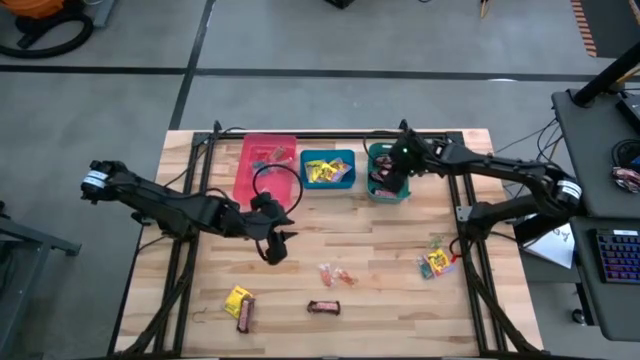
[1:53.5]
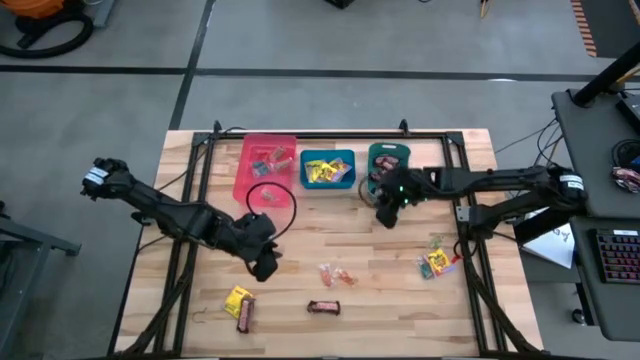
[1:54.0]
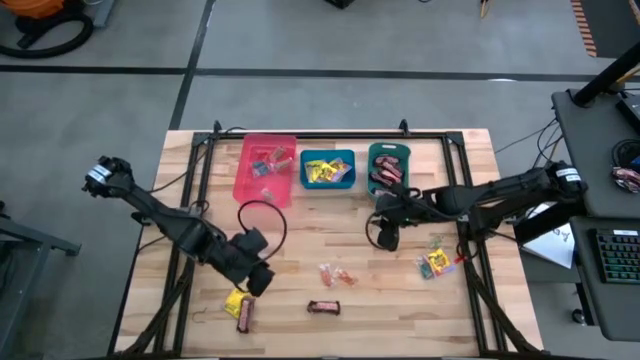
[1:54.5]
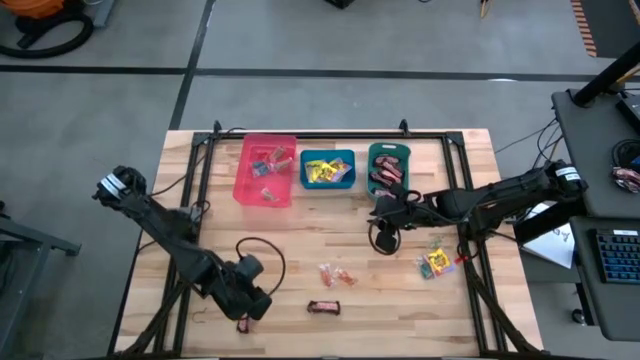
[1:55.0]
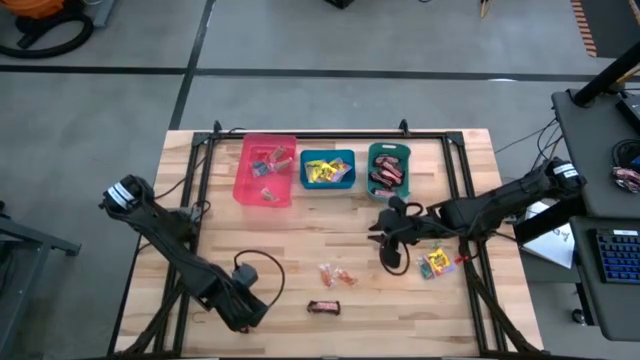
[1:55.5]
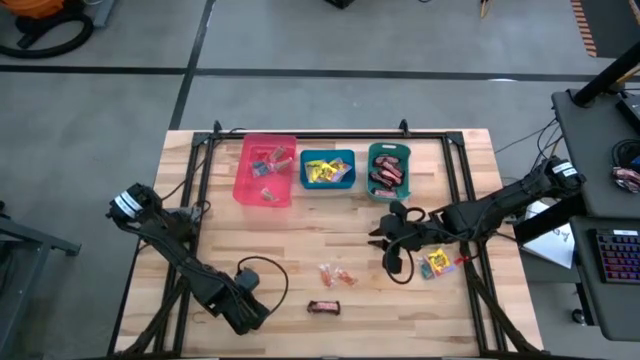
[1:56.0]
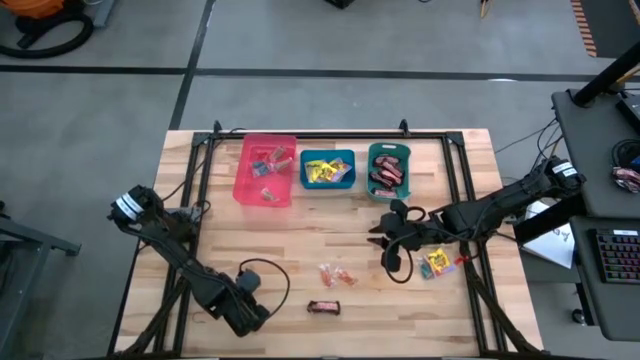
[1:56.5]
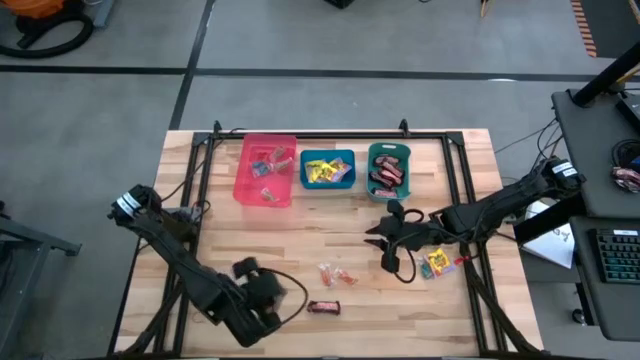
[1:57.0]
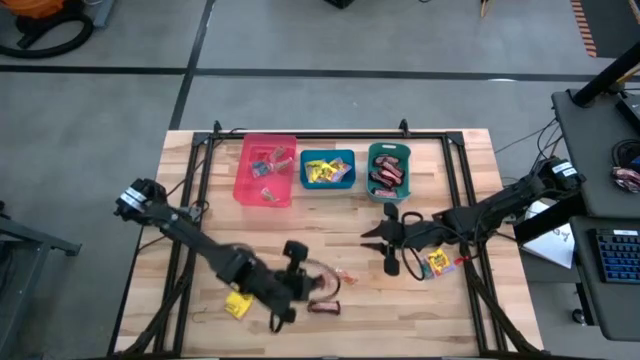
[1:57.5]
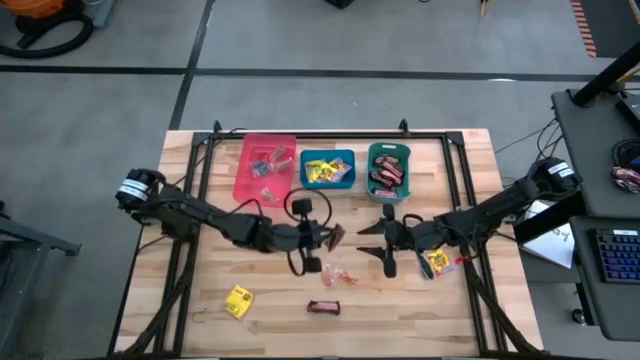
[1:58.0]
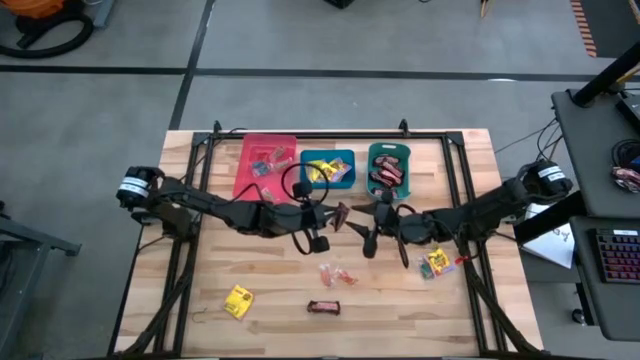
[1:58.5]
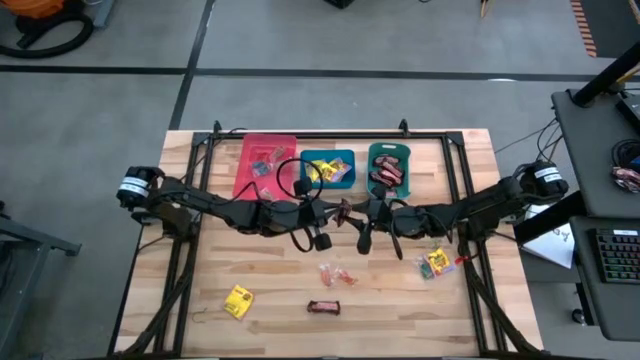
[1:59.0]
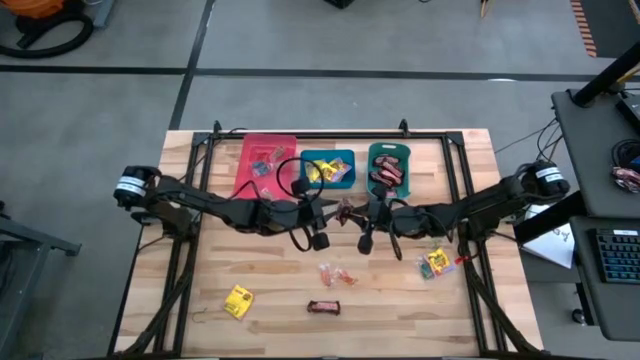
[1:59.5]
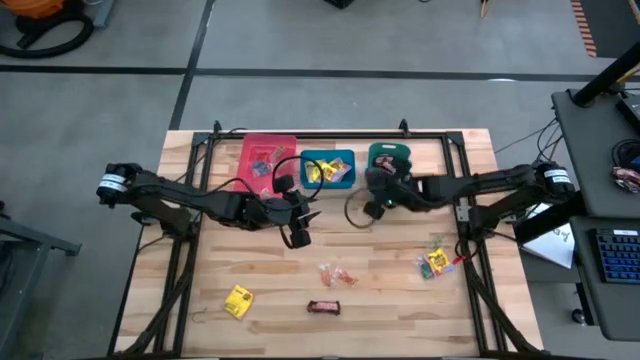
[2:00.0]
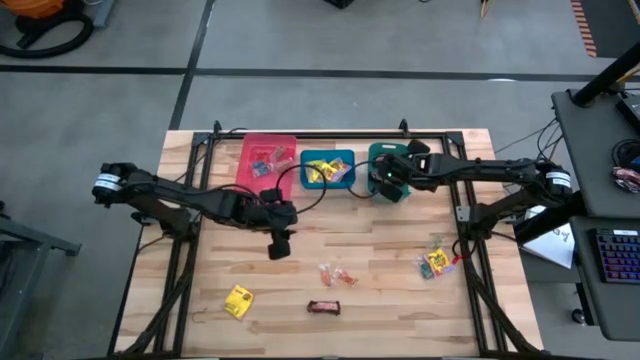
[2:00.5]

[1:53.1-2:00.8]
Task: Sort candy
Put the left brown candy into the green bin

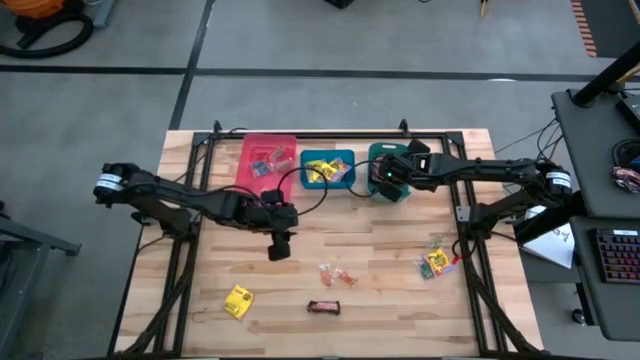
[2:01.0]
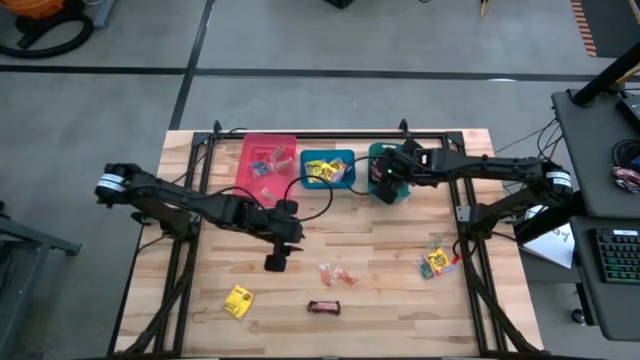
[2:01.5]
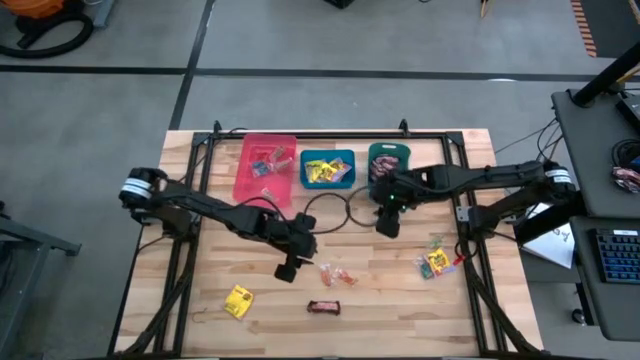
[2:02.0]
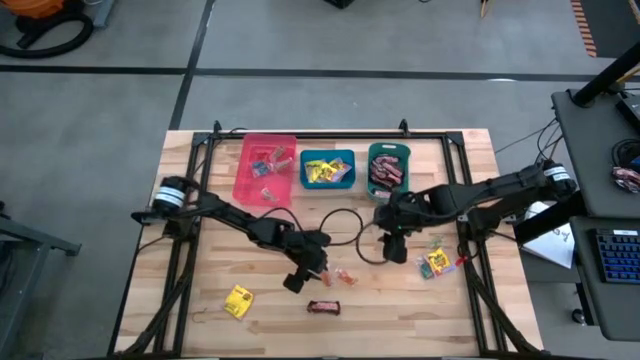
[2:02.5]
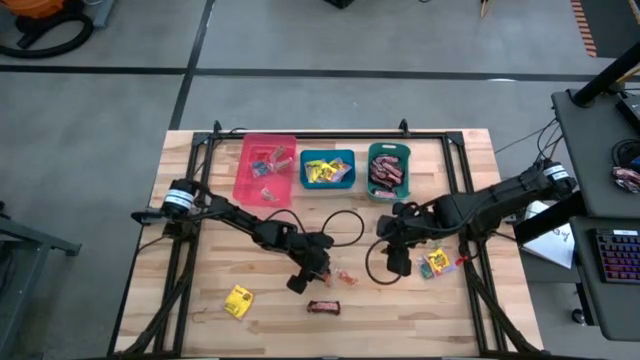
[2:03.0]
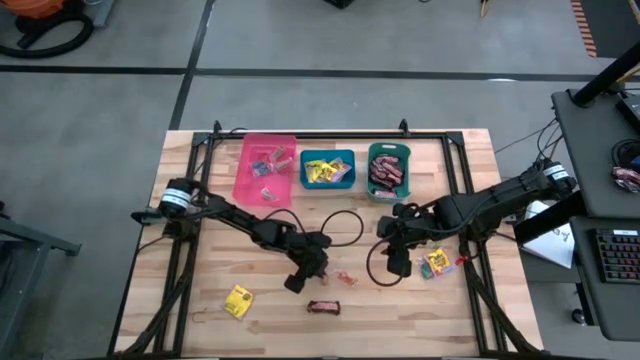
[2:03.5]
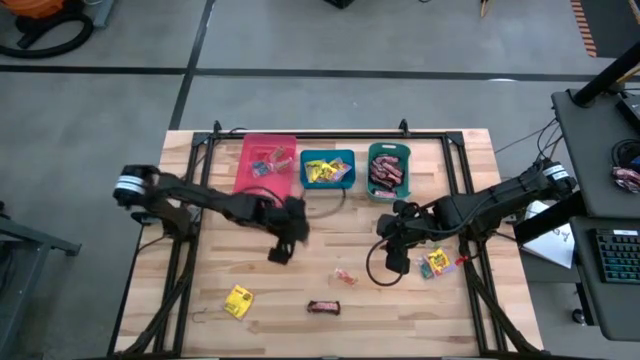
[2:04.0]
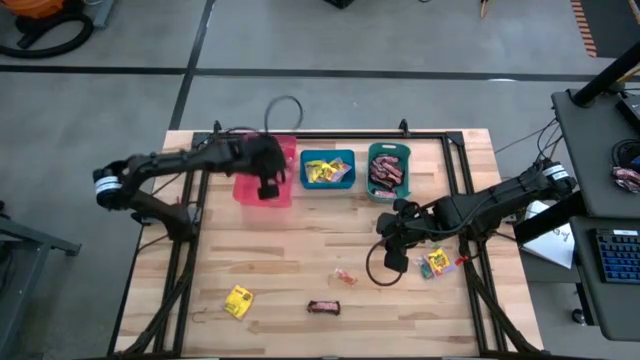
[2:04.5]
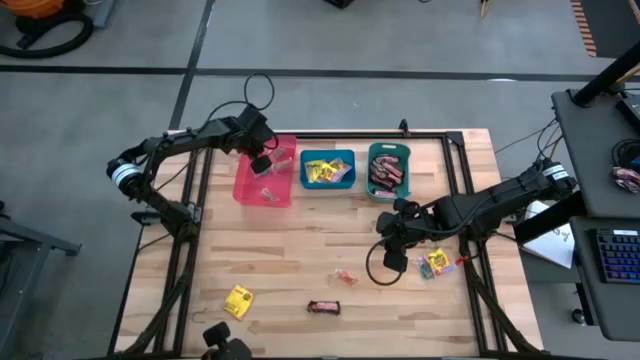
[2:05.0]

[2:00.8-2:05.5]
Put the left orange candy into the red bin

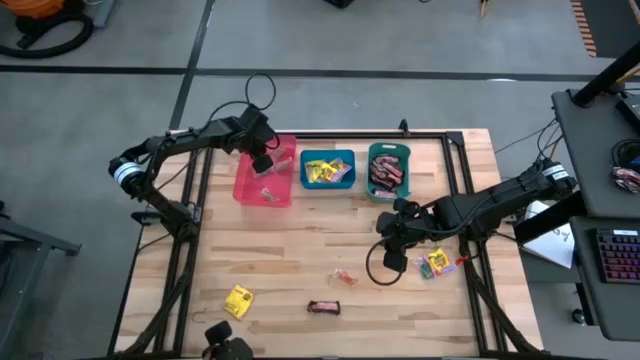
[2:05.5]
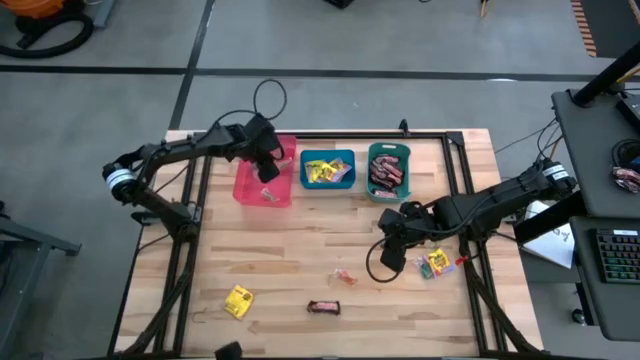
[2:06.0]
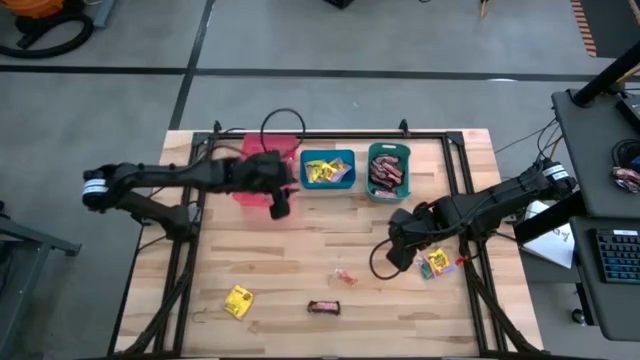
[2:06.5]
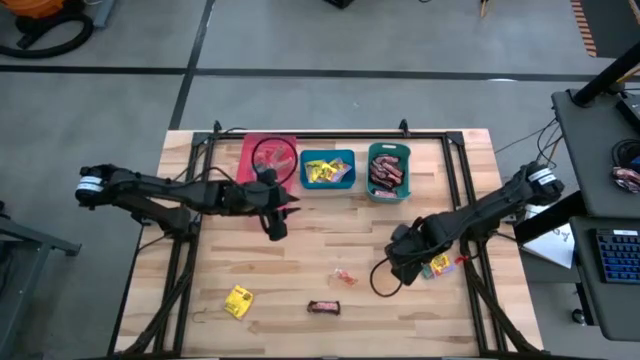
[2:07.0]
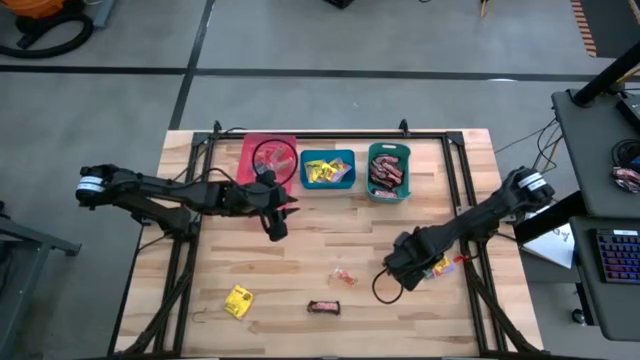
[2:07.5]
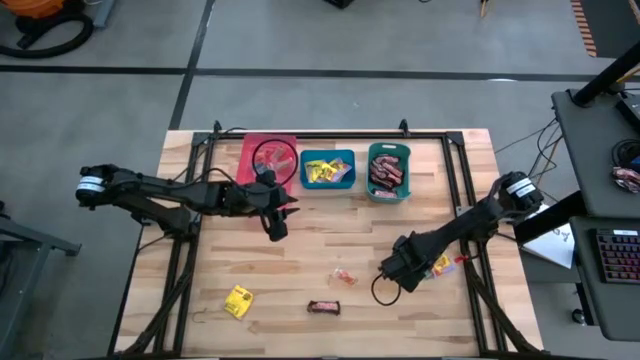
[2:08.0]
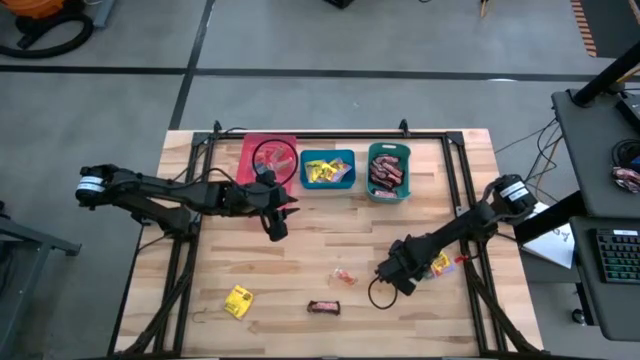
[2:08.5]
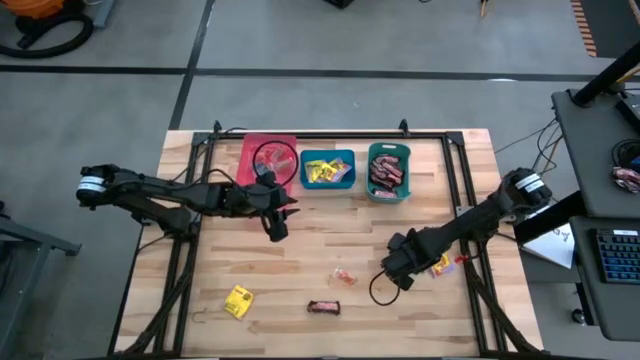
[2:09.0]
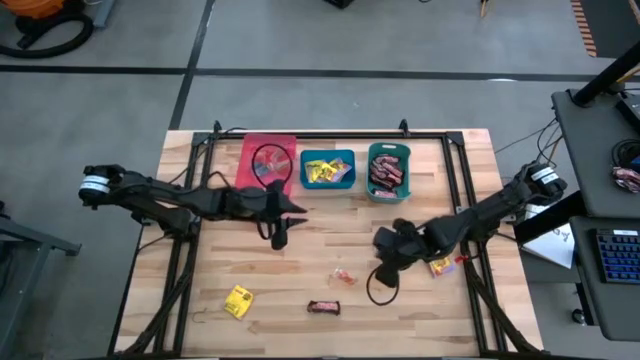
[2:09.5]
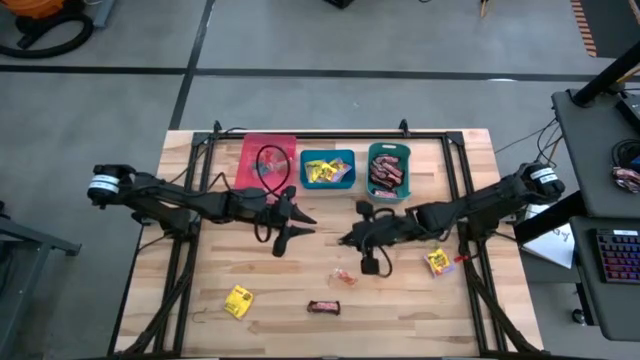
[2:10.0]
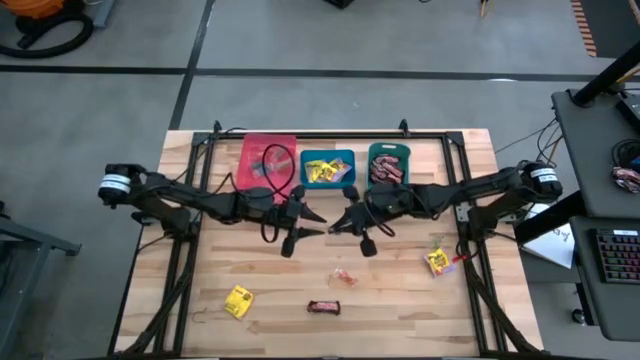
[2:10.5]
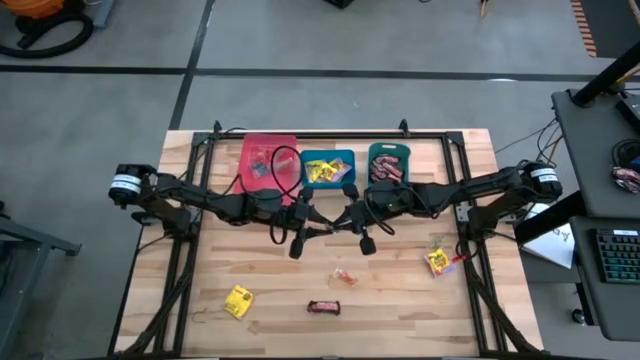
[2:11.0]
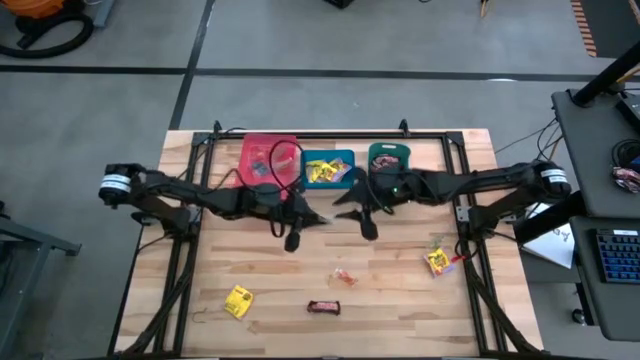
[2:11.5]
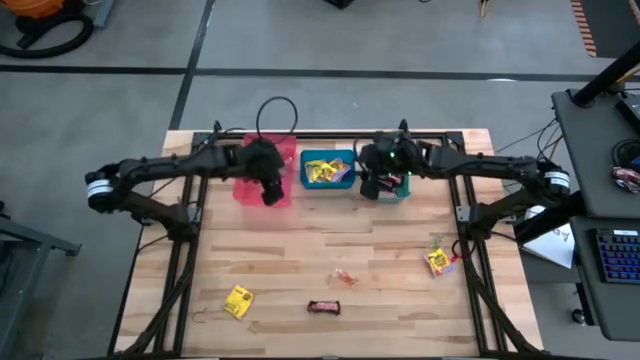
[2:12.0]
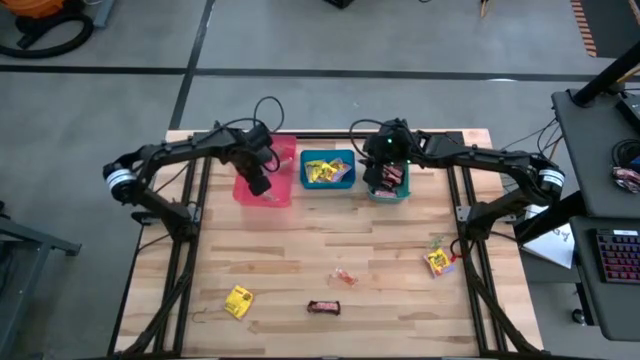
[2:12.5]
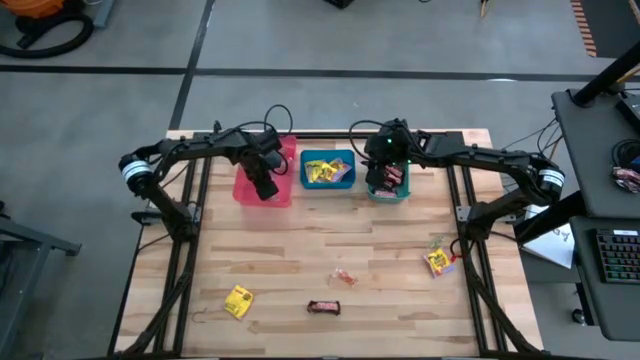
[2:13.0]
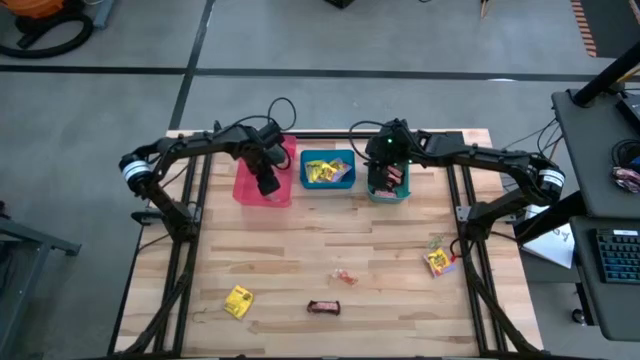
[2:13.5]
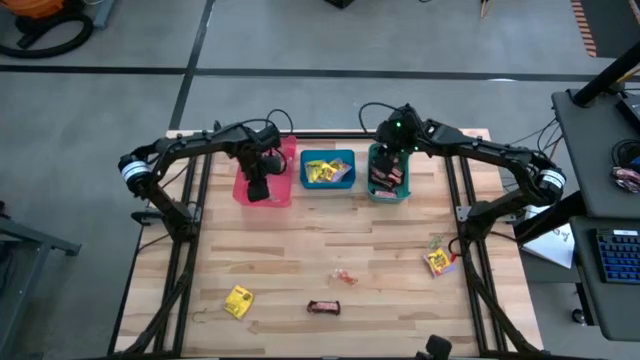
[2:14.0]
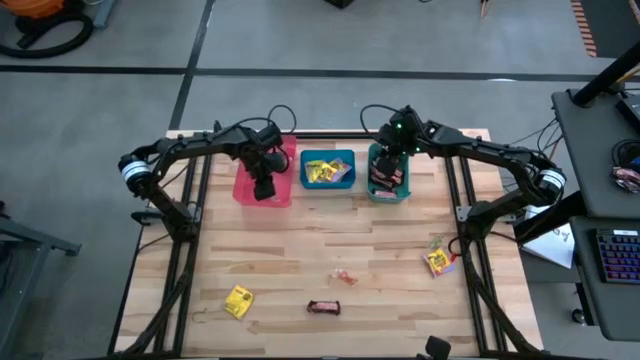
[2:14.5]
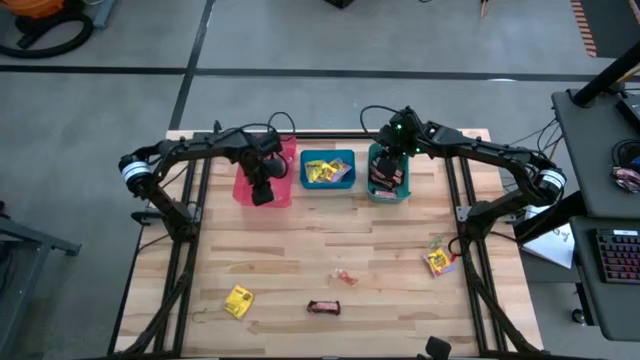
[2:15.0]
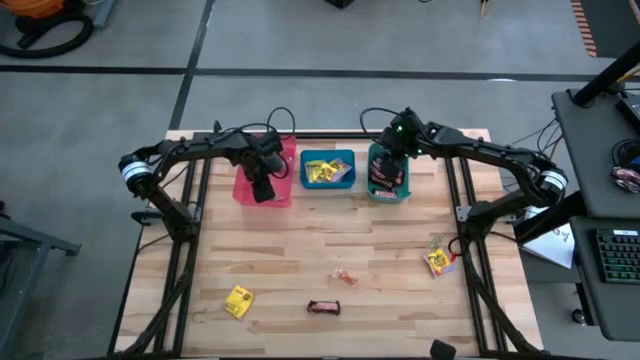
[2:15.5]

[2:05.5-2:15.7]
Put the blue candy into the red bin
